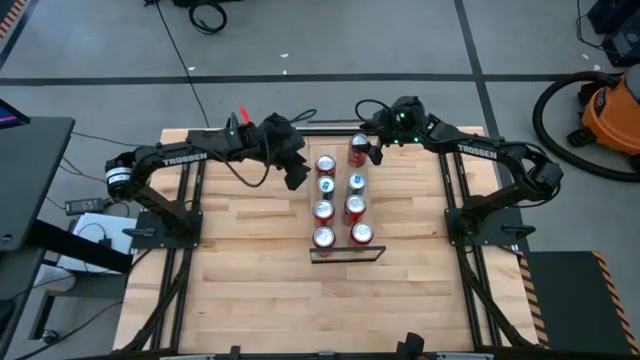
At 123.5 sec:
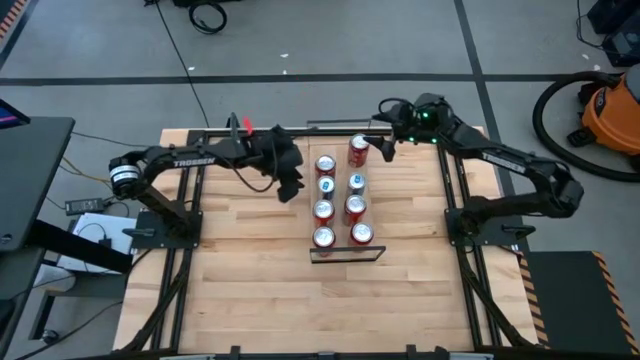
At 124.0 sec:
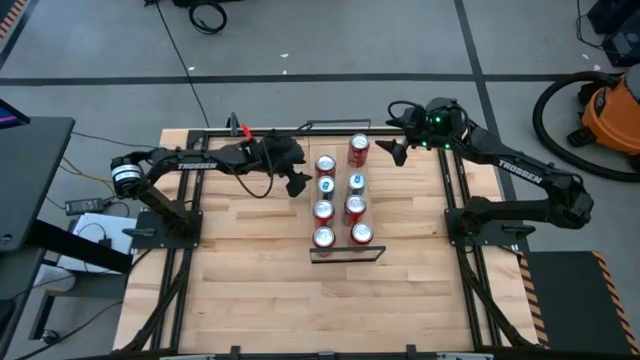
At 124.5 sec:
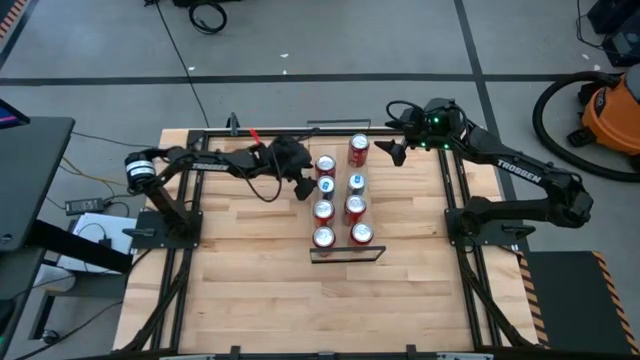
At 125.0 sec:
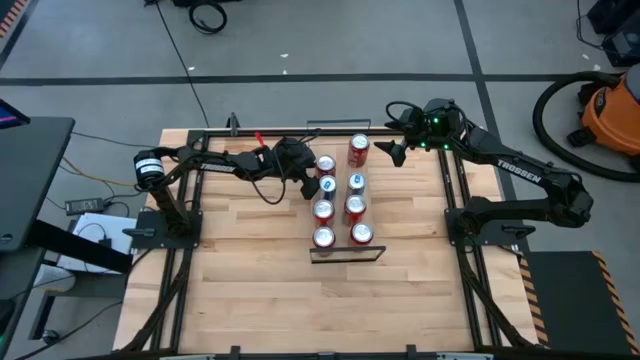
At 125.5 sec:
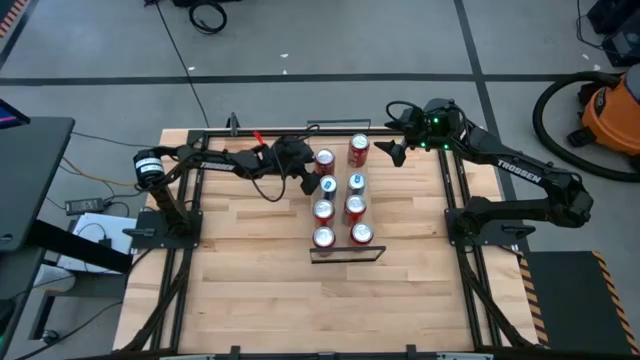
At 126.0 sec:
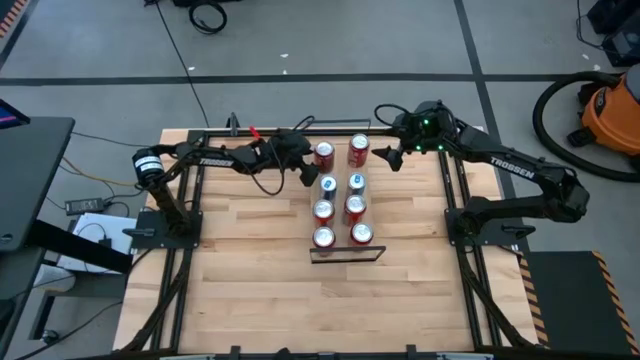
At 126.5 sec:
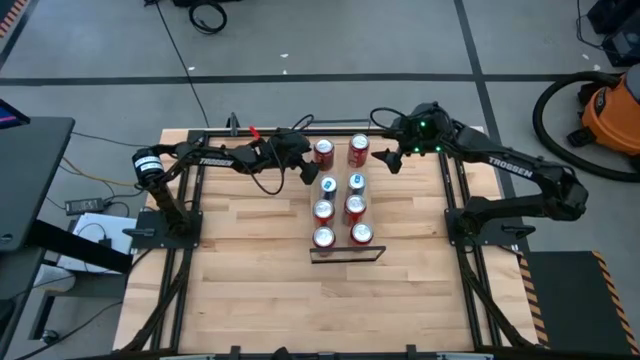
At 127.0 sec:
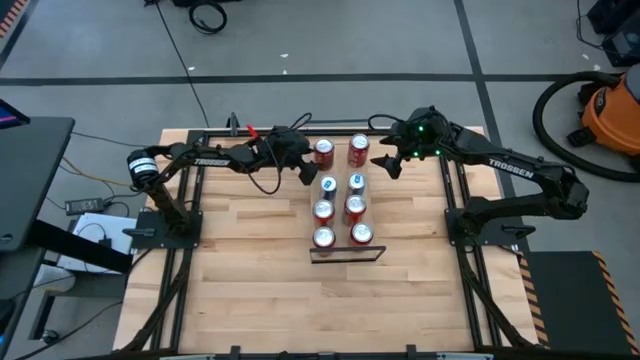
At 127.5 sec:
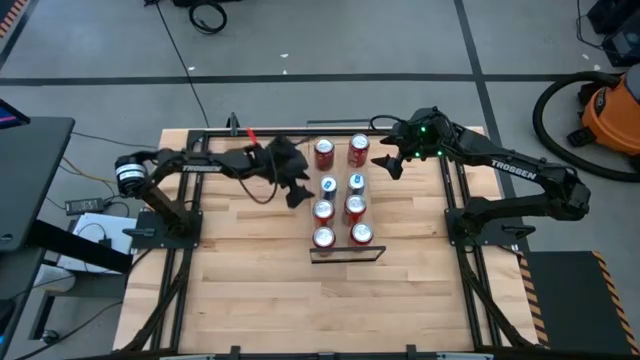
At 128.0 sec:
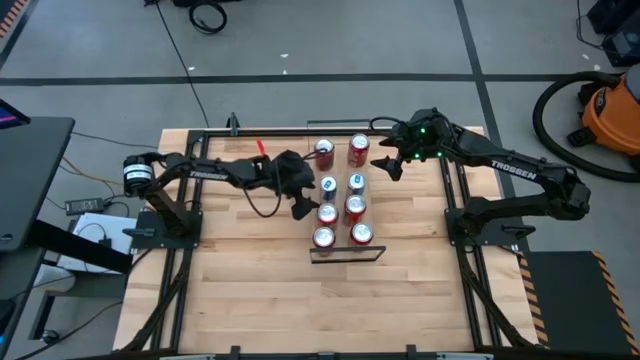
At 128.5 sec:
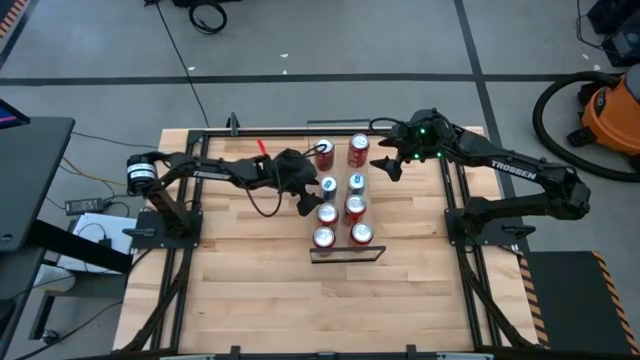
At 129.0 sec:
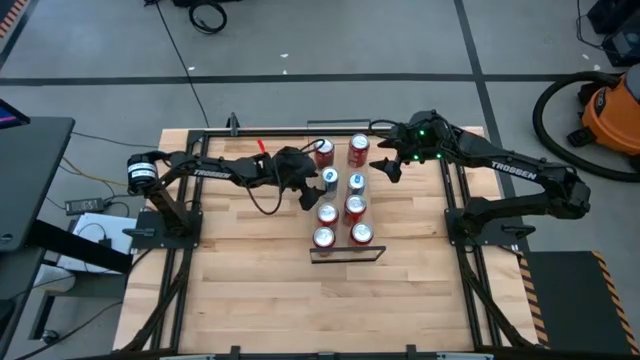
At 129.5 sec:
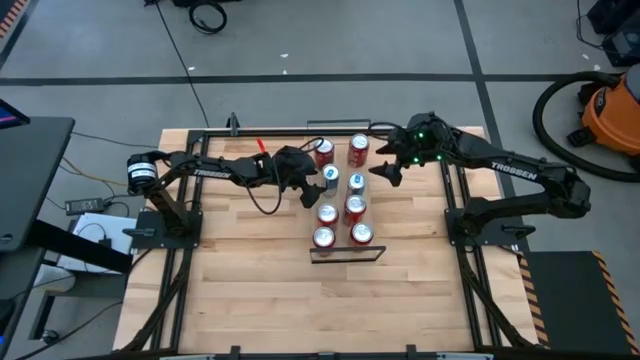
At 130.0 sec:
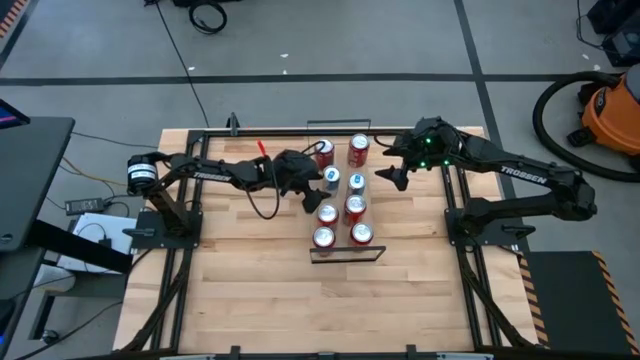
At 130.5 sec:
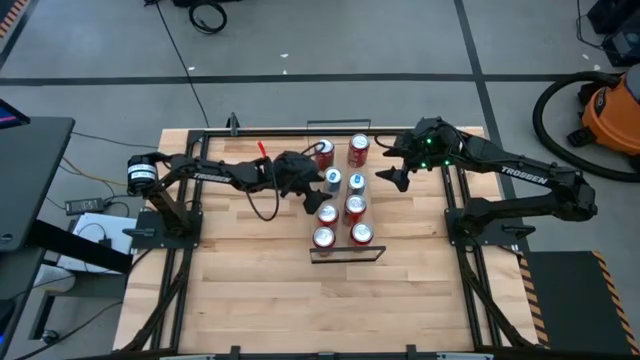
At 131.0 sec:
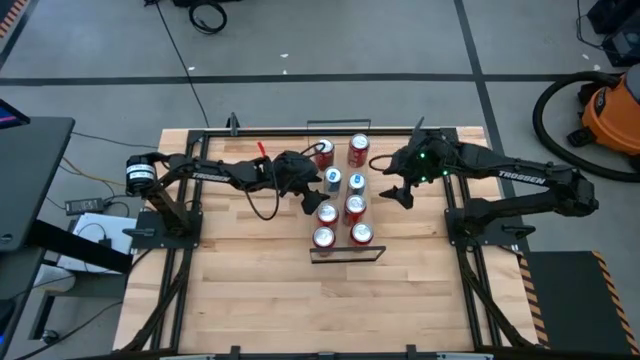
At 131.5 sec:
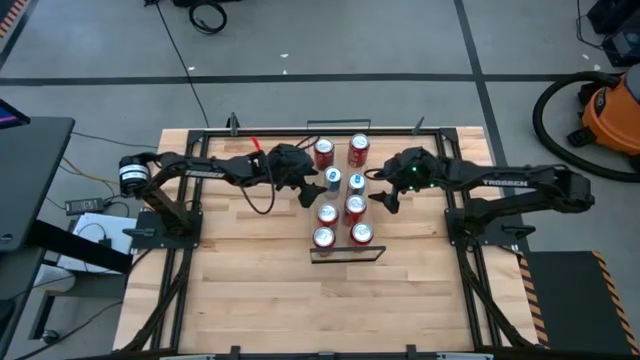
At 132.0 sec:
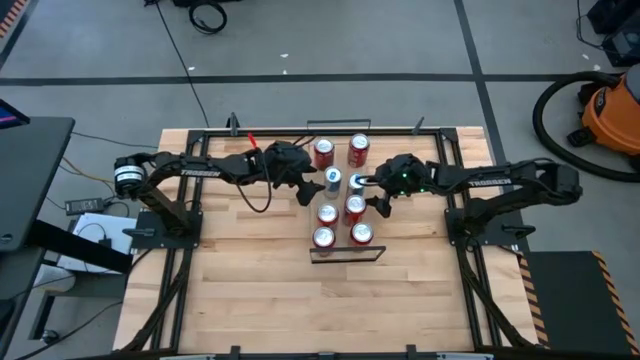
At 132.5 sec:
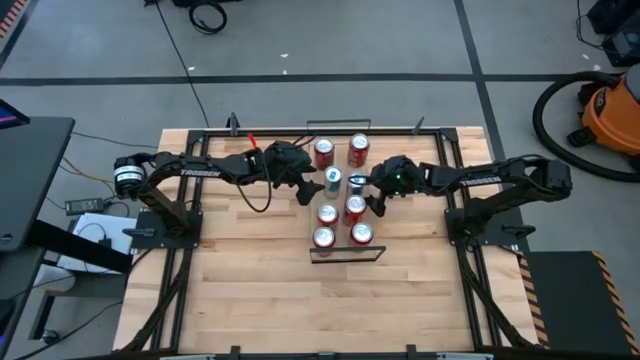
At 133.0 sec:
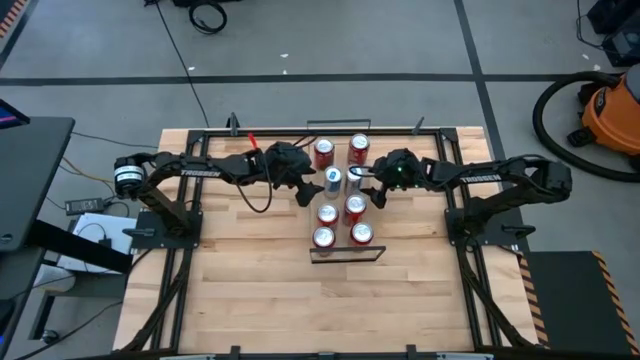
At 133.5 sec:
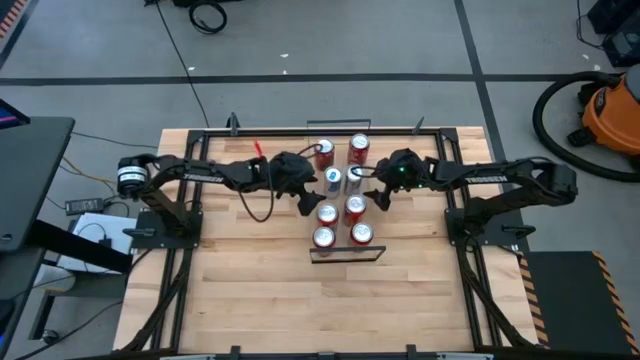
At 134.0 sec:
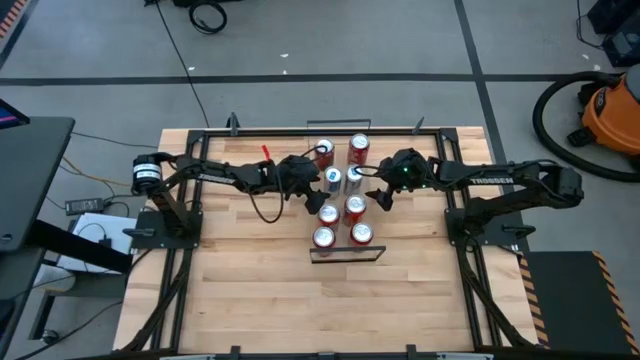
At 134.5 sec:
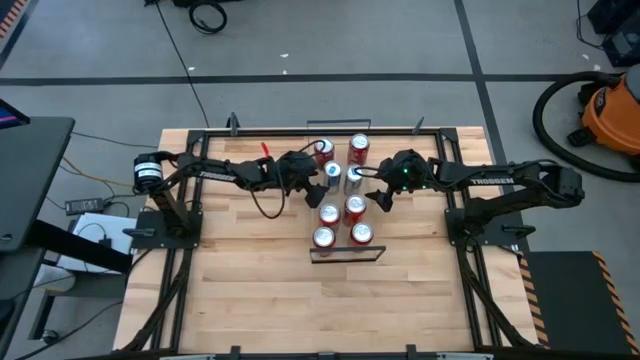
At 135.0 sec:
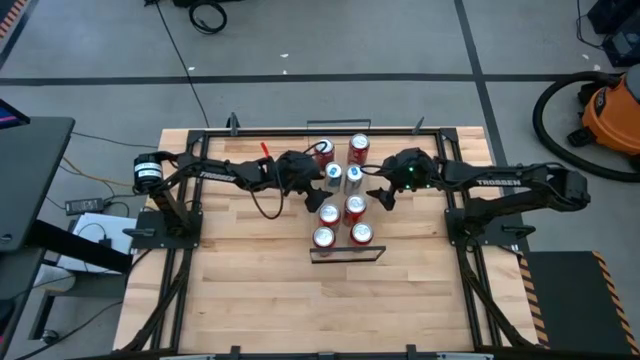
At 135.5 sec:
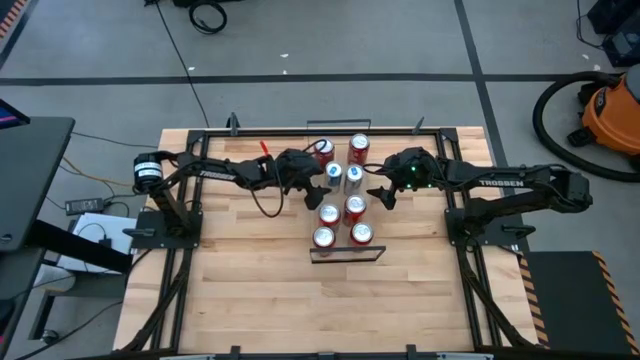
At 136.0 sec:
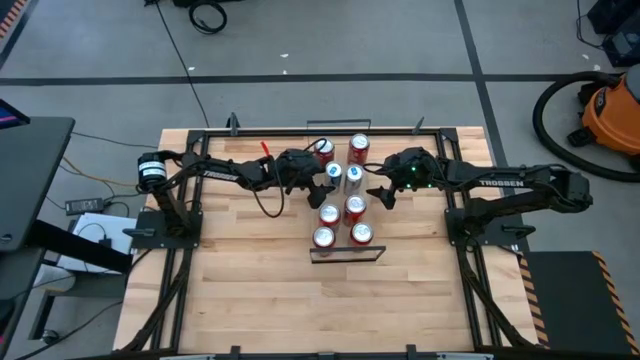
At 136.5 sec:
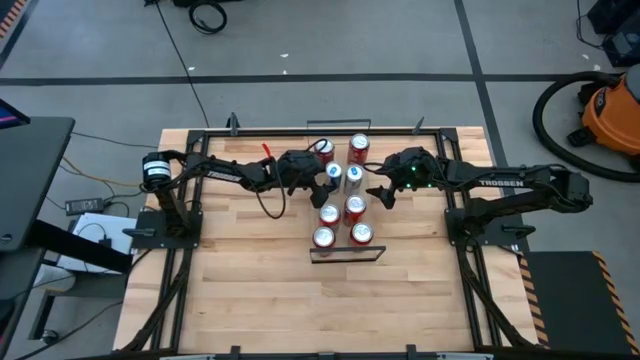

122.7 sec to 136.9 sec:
Task: Place canned beverage on shelf
Adjust the soda cans on the shelf

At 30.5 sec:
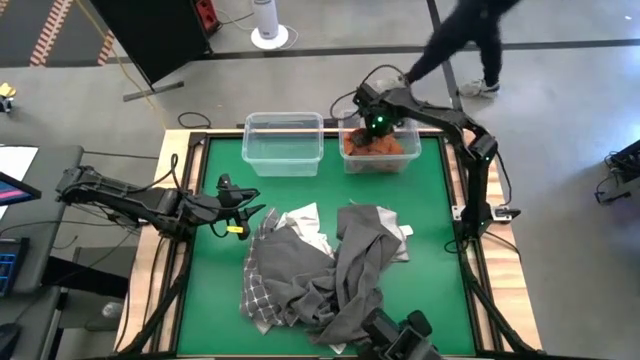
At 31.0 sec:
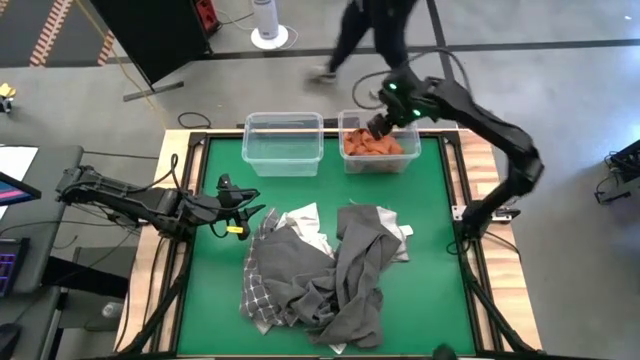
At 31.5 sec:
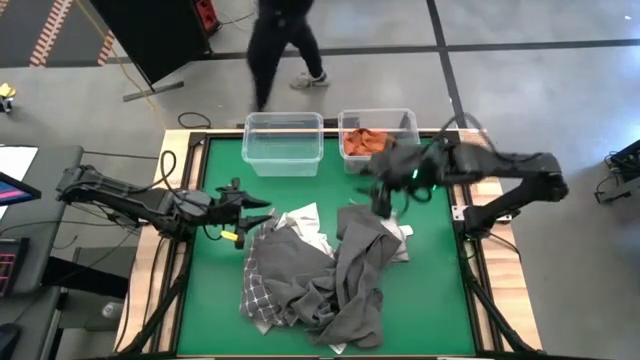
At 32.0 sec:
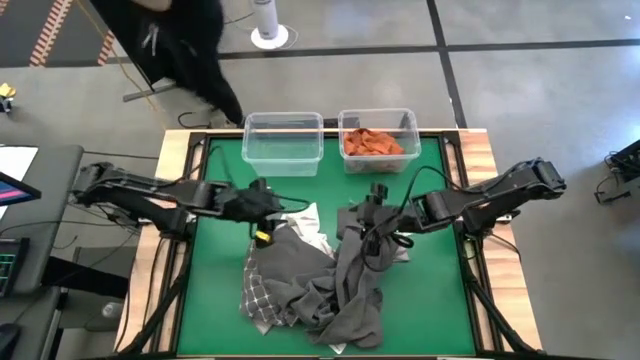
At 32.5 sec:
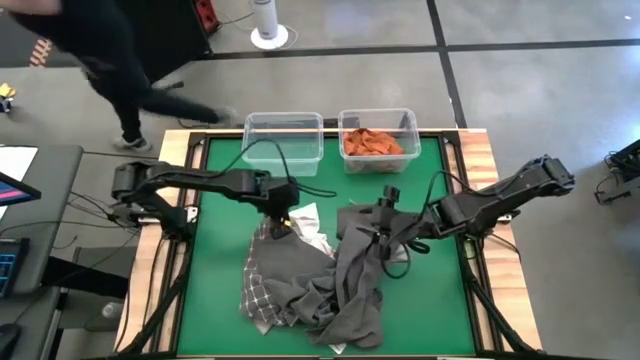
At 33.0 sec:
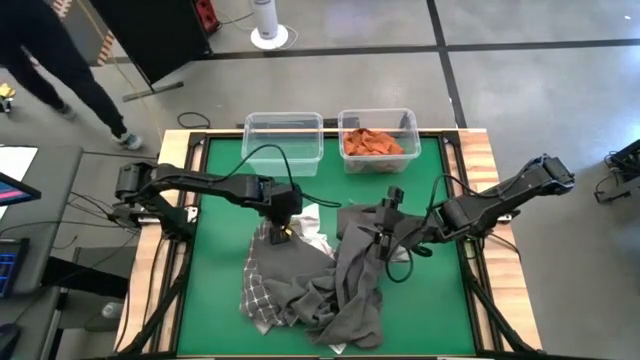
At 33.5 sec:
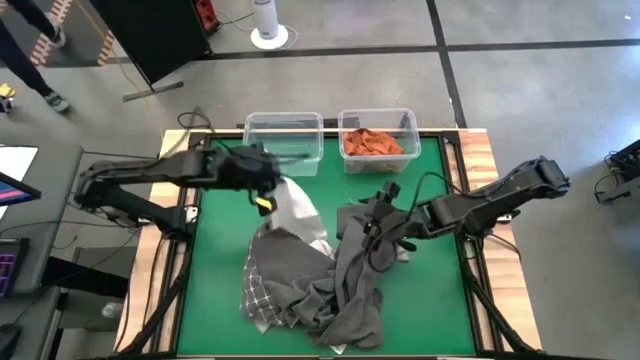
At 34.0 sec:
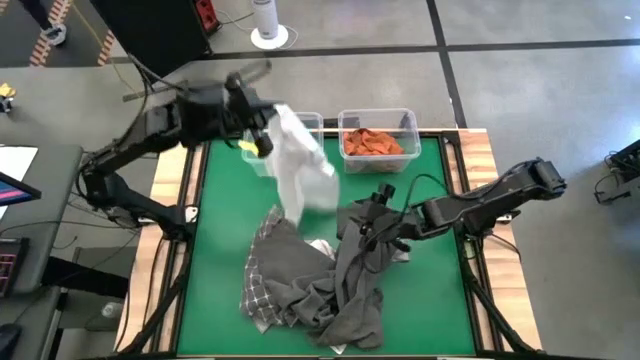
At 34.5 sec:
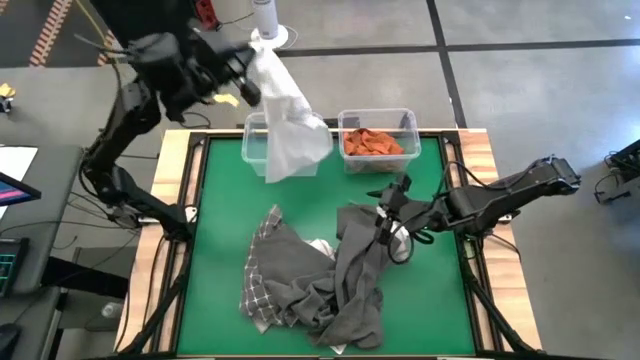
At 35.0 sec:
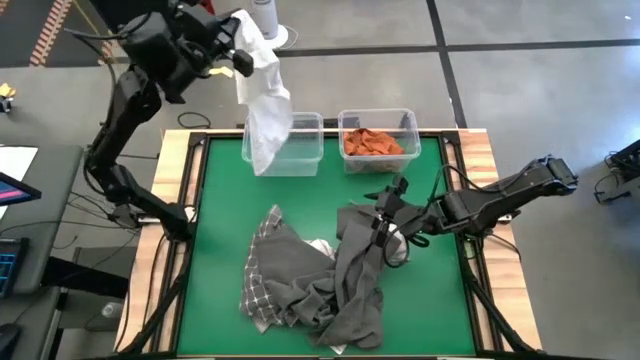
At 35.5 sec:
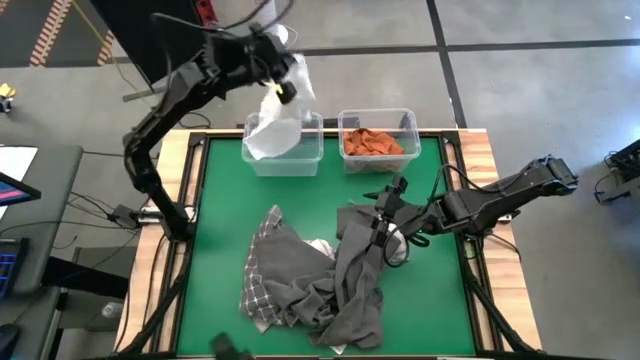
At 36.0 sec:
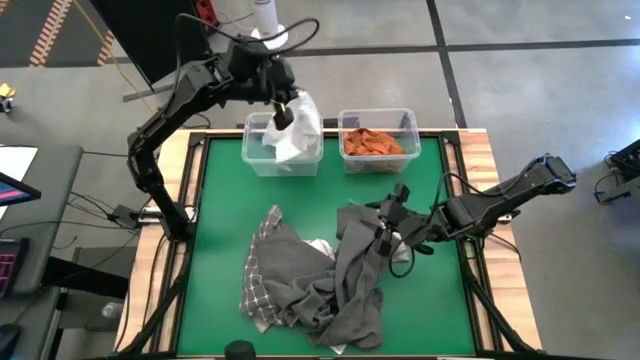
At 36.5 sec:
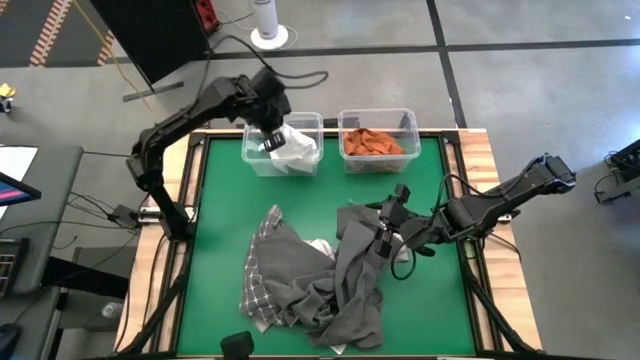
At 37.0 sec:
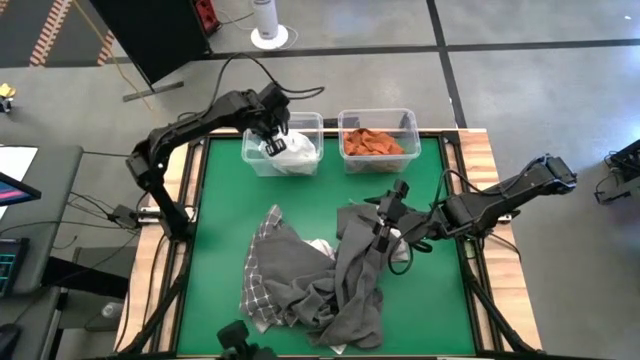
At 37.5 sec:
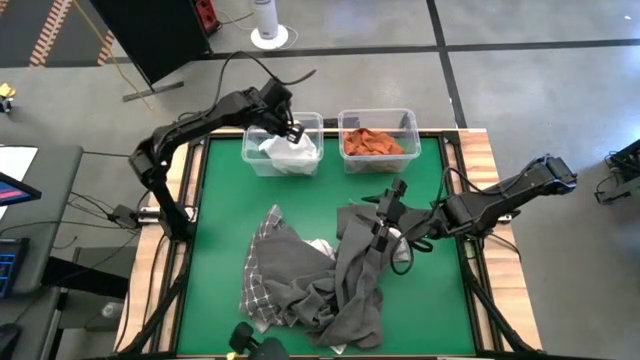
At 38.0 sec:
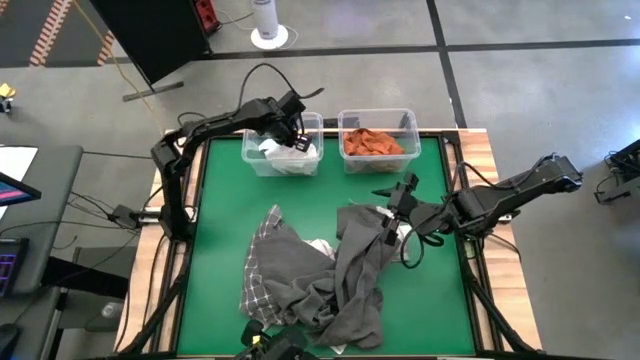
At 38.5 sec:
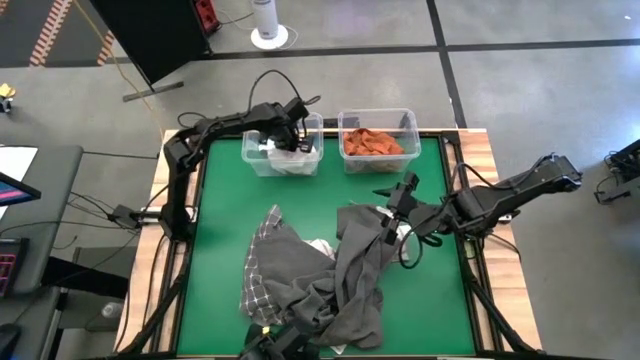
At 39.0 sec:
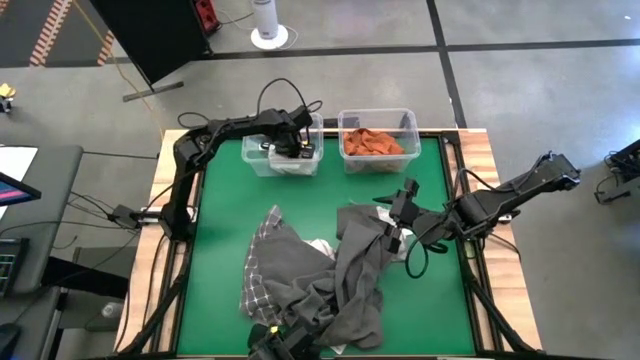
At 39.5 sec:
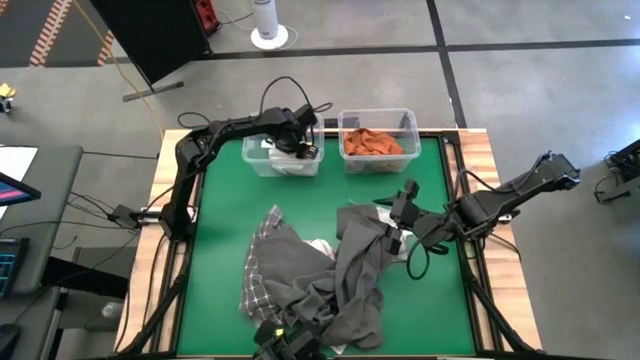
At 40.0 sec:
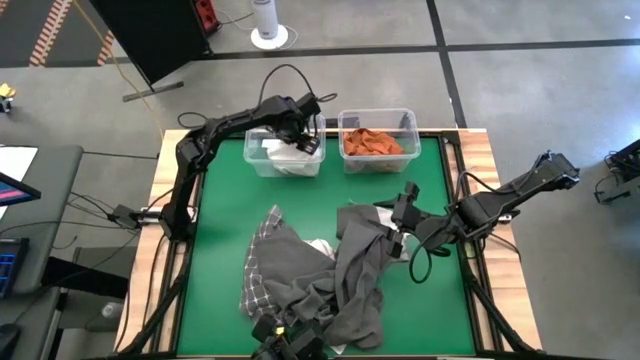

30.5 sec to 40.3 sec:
Task: Sort towels by color in basket
Put the white microfiber towel into the left transparent bin
